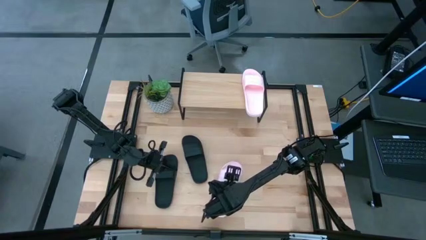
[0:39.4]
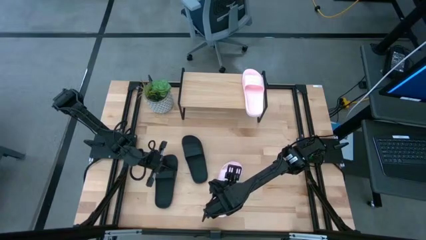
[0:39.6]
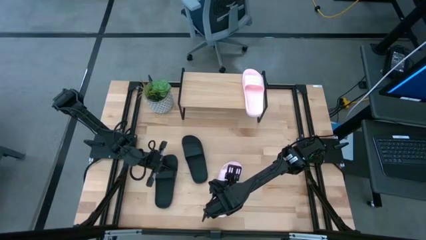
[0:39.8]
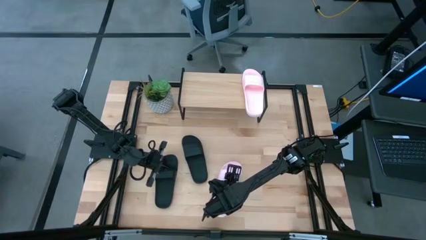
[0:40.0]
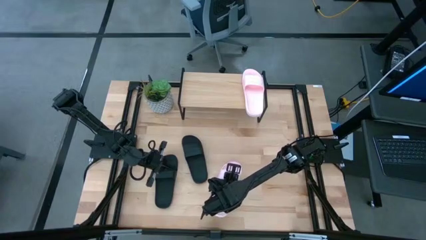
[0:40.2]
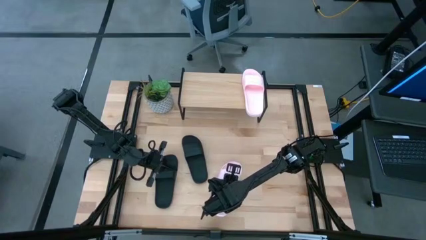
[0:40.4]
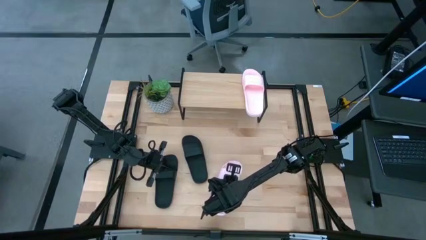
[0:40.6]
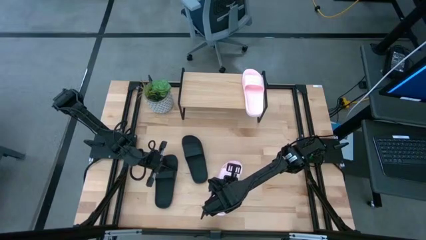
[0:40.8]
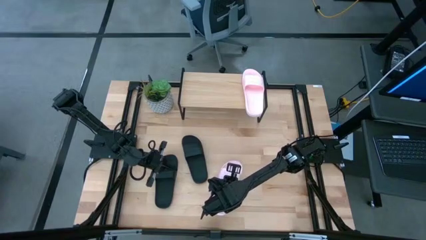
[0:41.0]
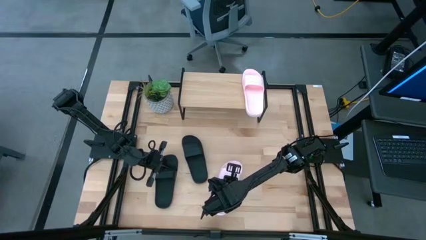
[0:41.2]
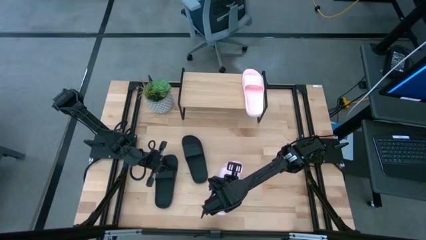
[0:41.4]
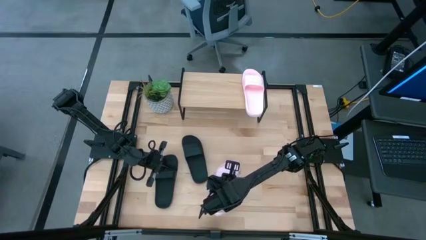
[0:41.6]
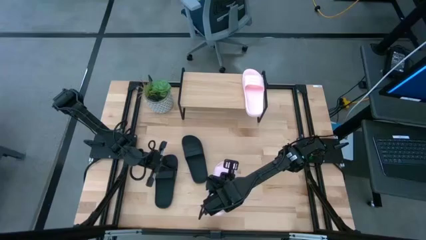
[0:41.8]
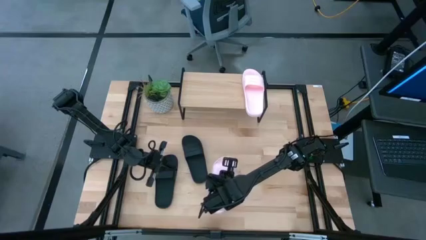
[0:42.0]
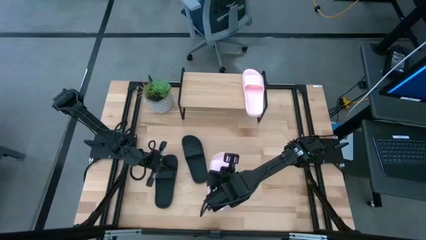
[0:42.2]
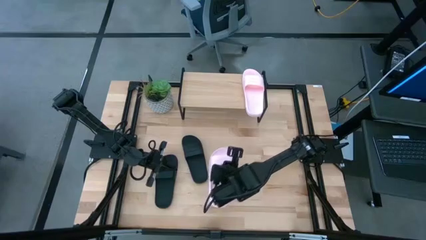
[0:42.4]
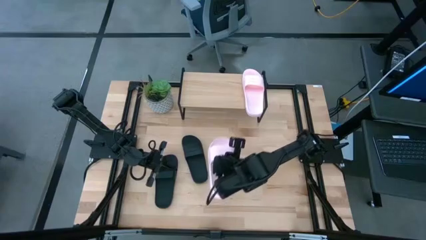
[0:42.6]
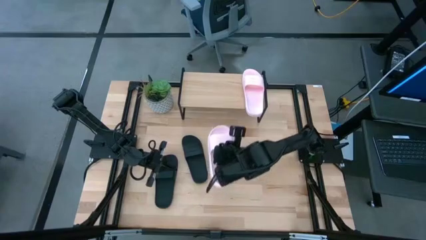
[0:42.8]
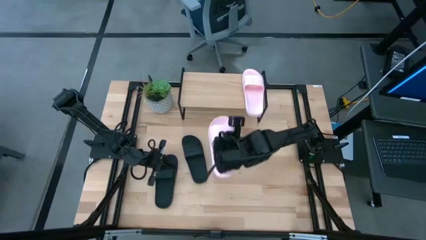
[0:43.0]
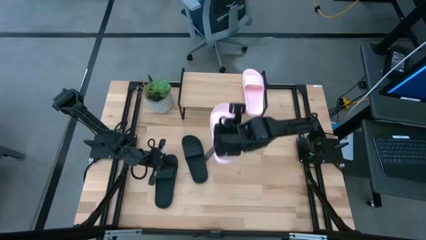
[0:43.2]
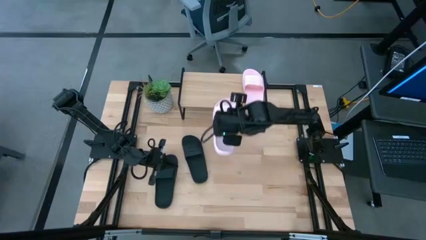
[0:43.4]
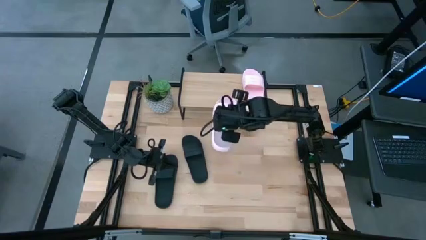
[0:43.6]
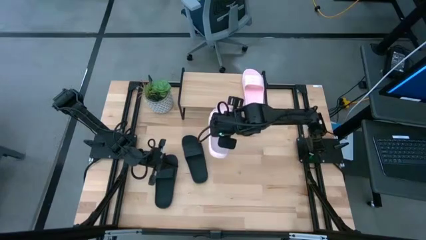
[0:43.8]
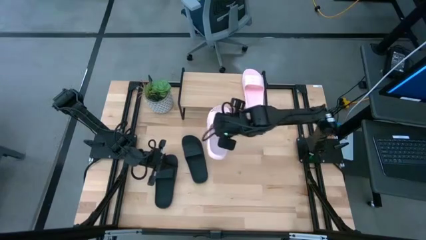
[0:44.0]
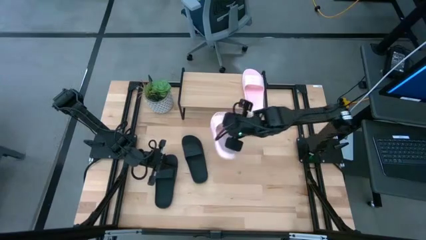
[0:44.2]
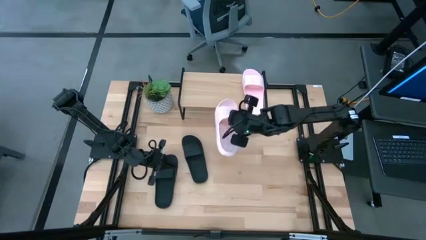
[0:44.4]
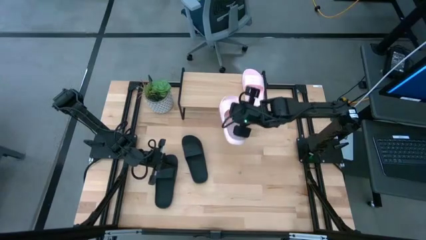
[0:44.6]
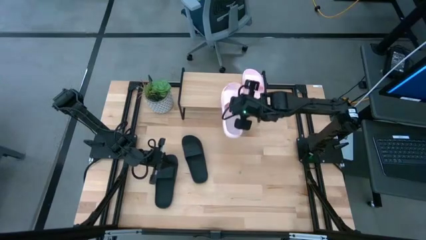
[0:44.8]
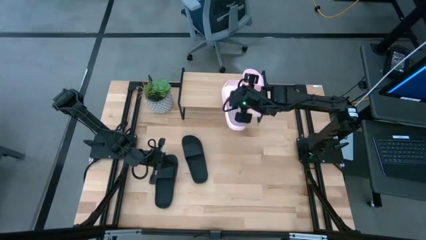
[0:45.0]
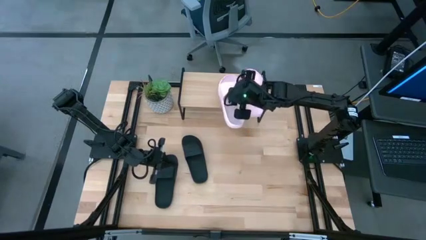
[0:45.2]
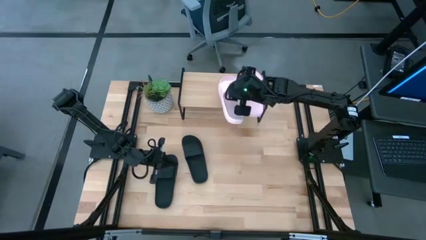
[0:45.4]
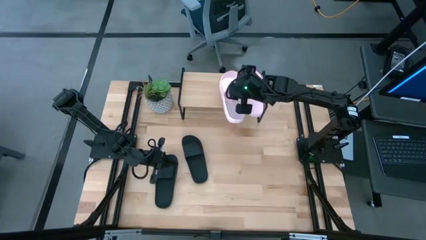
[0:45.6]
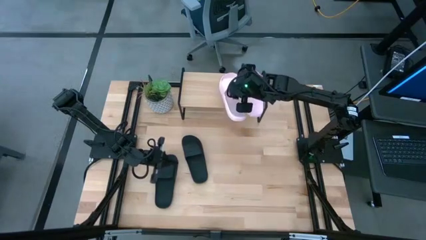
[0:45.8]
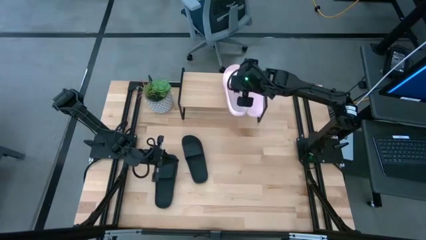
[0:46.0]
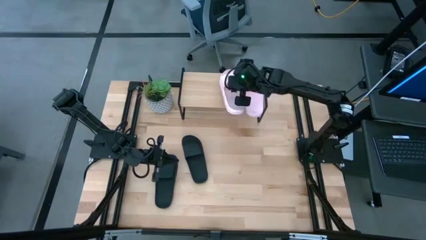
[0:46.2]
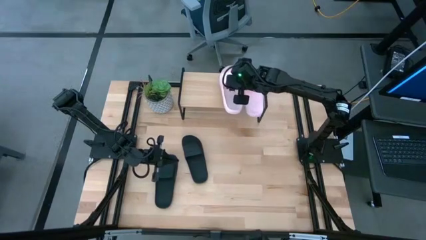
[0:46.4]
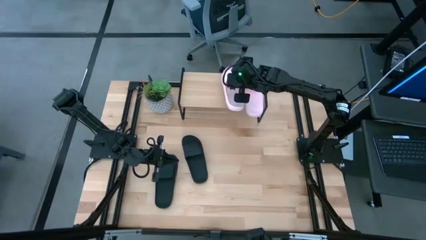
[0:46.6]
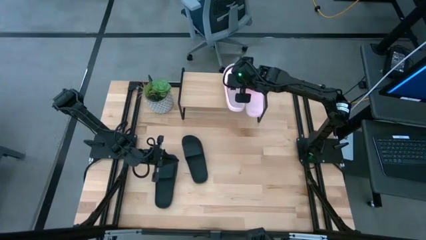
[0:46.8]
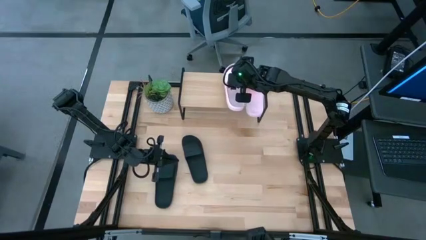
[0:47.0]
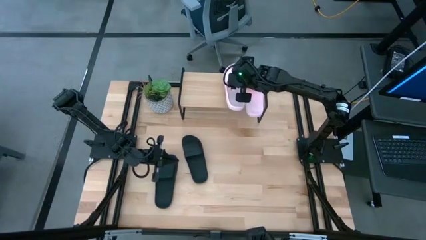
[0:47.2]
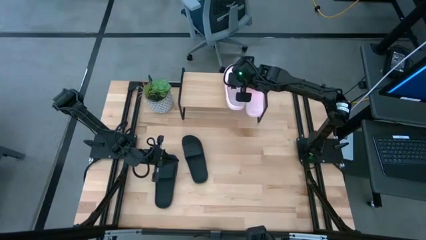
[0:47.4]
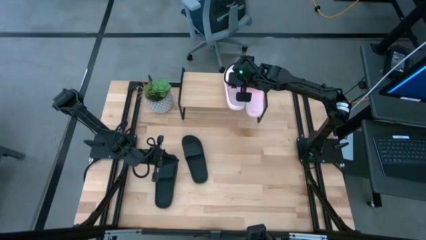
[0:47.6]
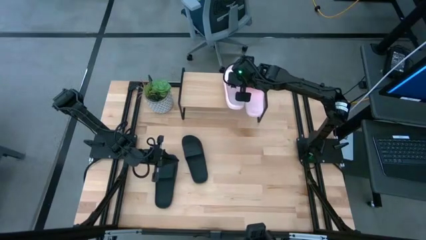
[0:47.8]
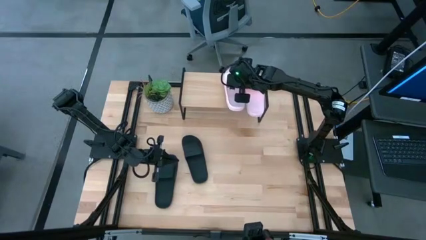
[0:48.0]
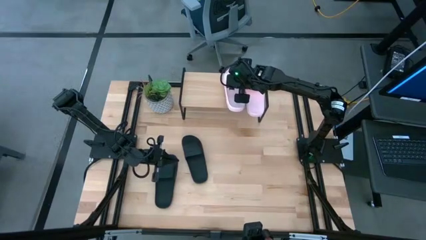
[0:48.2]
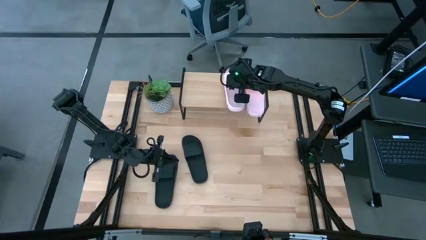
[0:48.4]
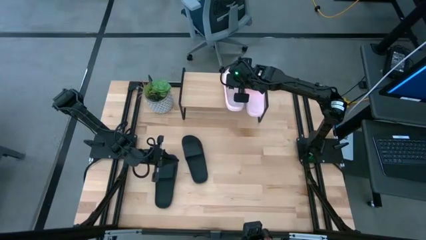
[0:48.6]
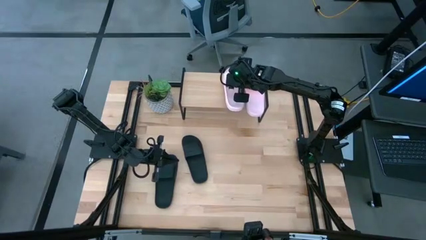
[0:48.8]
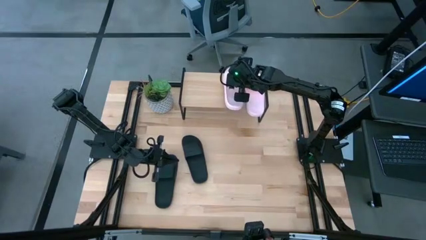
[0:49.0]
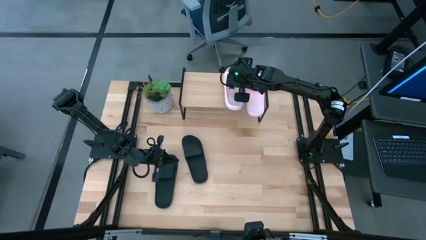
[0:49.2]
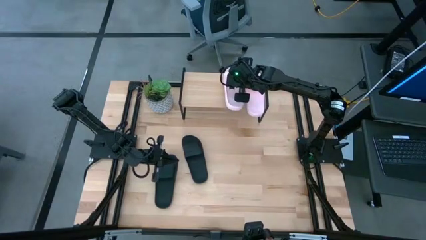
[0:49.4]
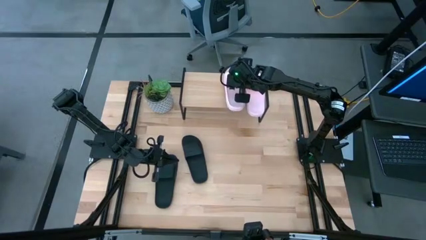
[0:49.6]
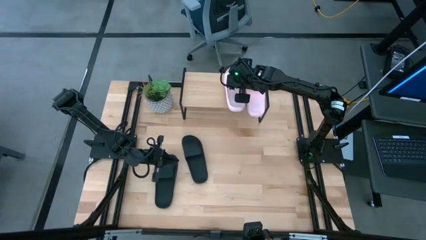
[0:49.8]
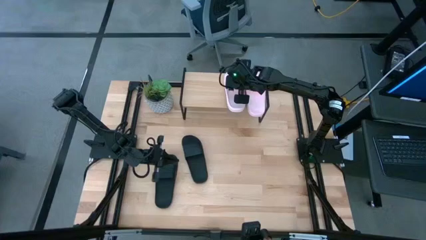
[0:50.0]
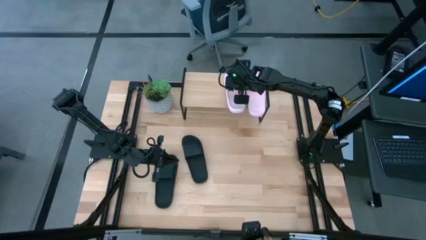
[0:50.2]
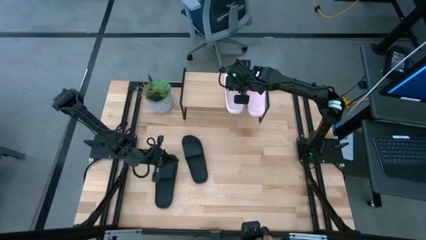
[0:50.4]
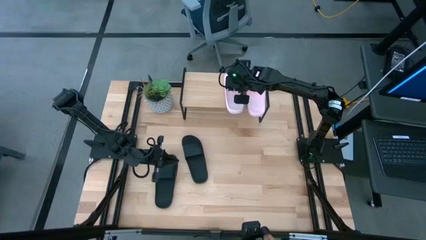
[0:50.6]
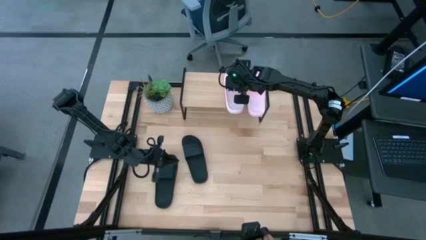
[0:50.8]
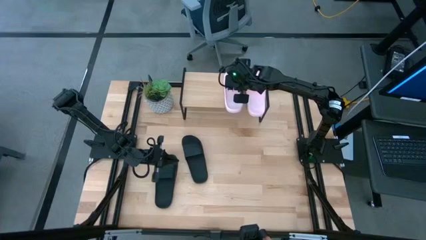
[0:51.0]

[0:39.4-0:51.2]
Task: Pick and place slides into the shelf
Put the pink slide on the shelf
